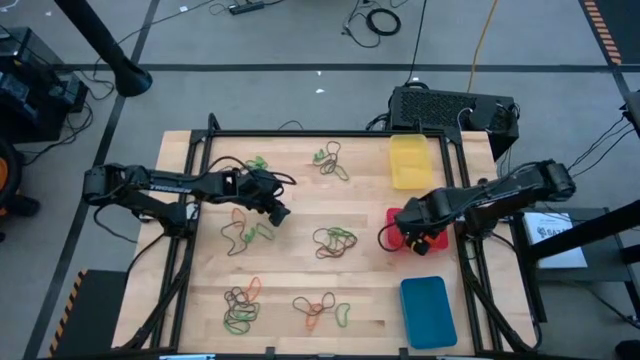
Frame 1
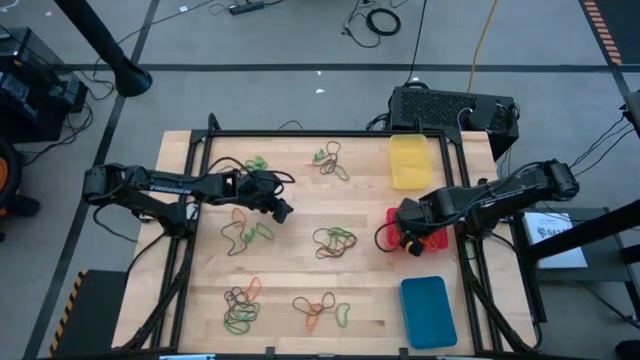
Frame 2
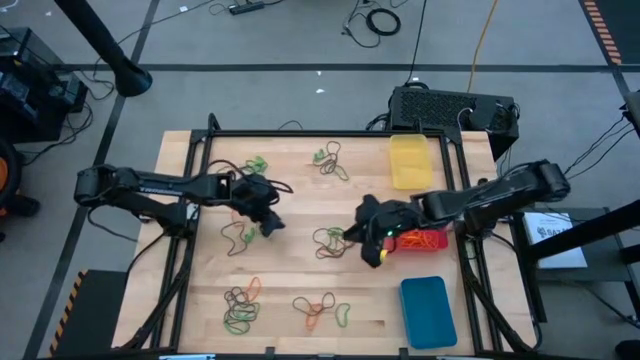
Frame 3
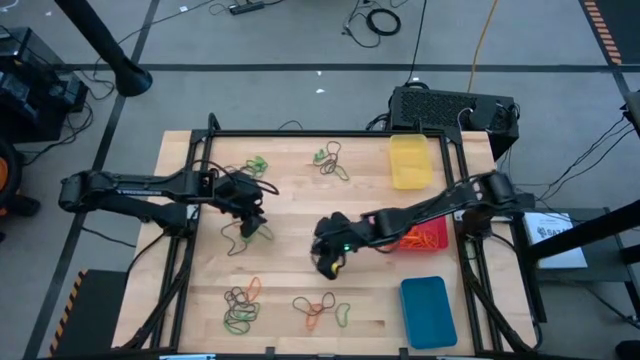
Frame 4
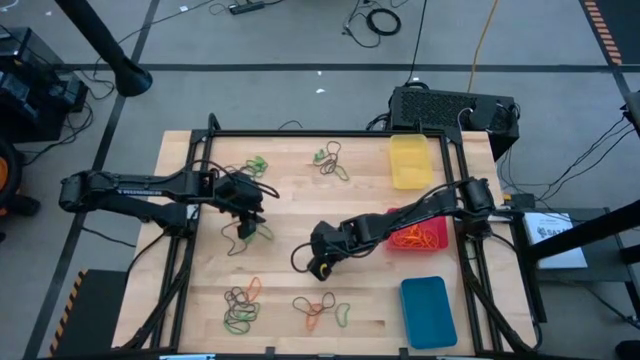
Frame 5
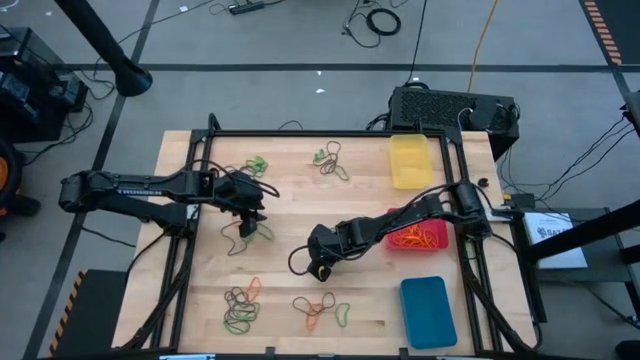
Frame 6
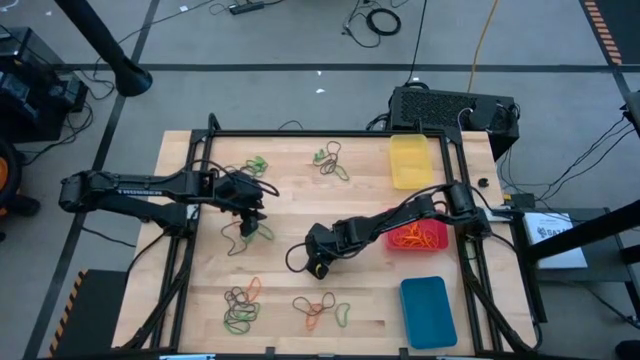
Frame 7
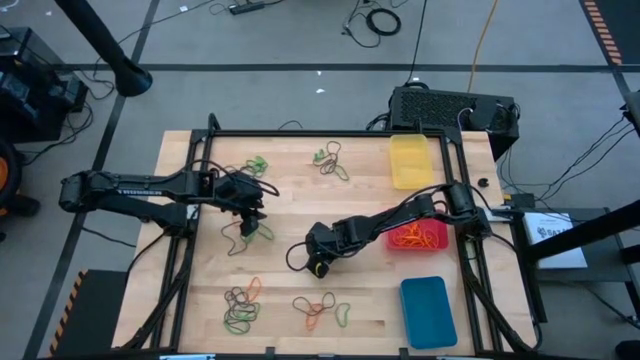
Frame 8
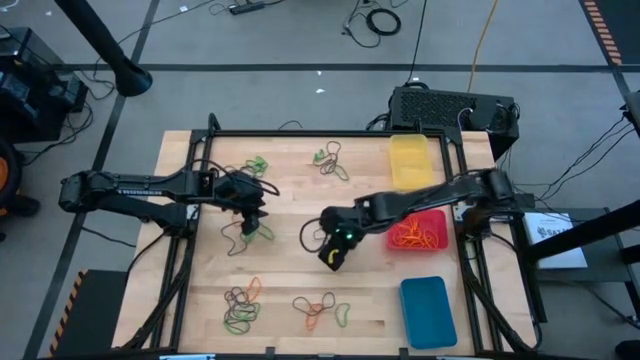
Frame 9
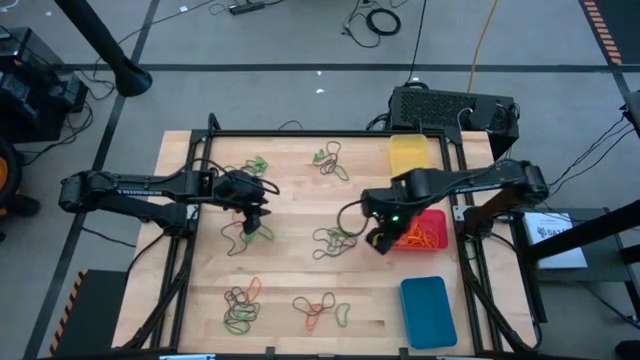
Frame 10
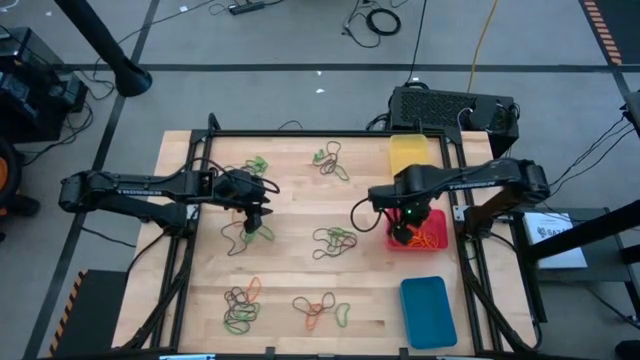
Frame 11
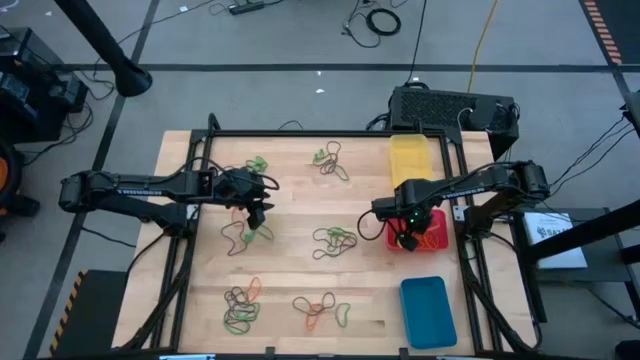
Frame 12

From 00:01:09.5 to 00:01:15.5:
Task: Sort rubber bands into baskets
Put the orange rubber band into the red bin

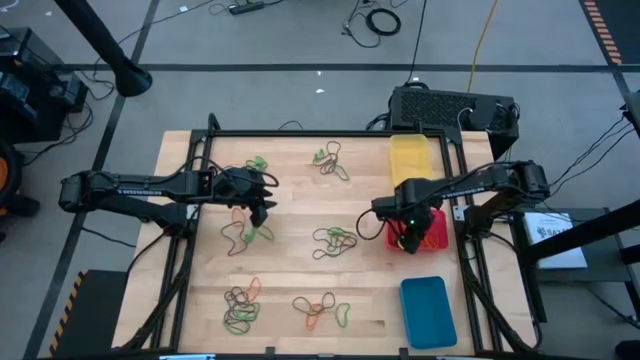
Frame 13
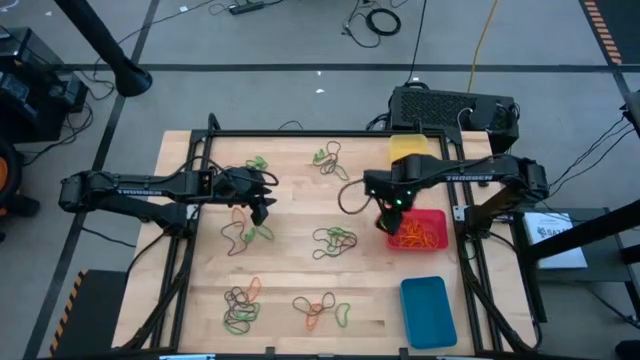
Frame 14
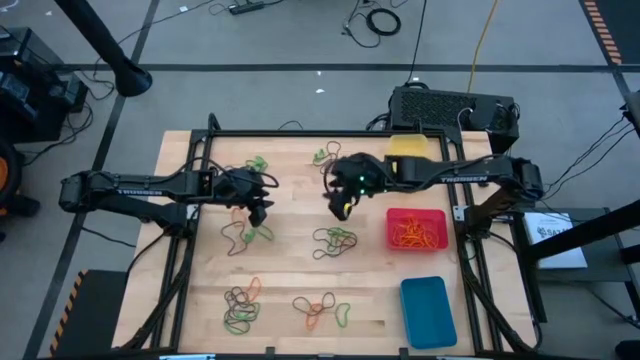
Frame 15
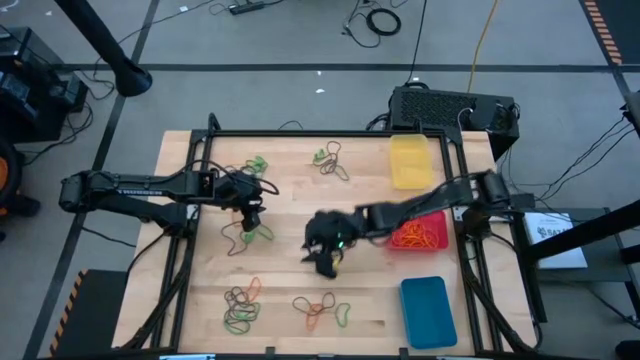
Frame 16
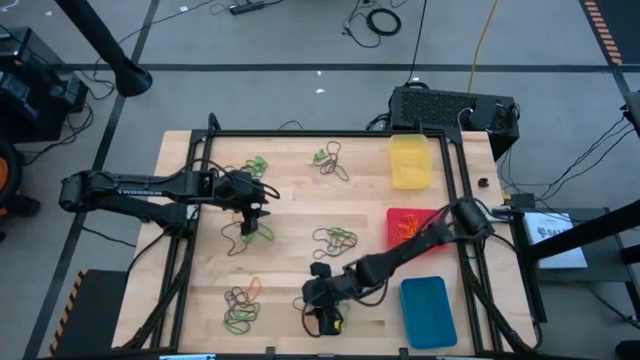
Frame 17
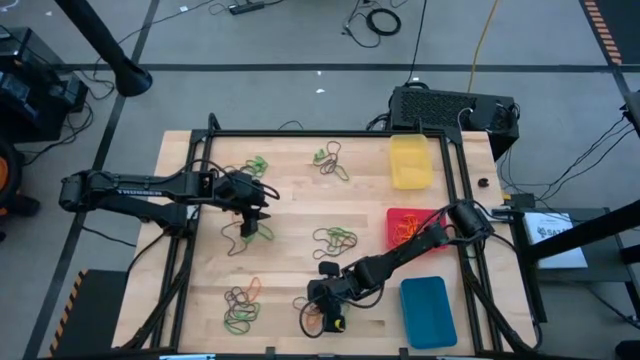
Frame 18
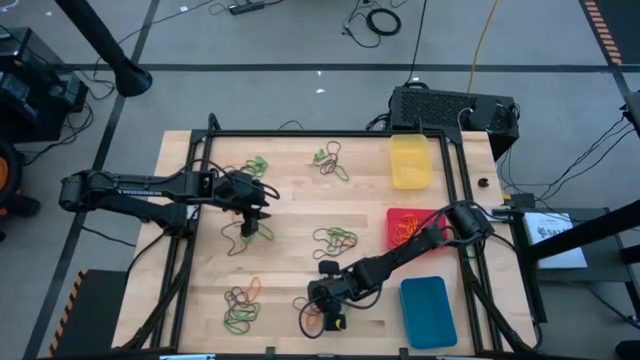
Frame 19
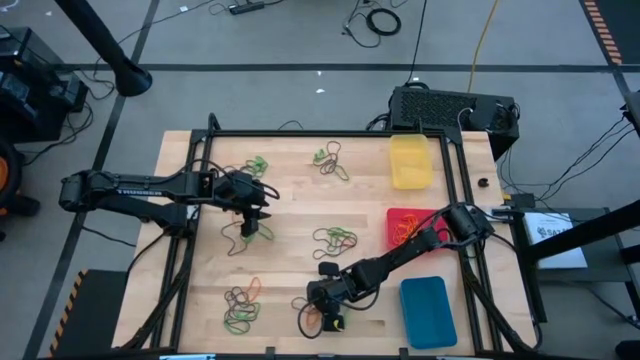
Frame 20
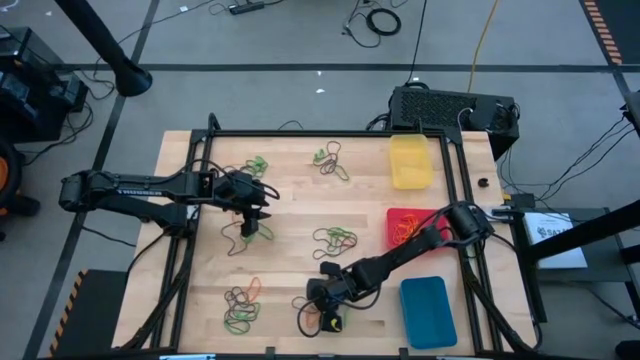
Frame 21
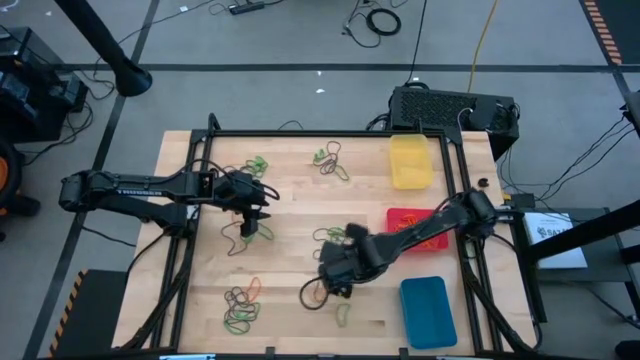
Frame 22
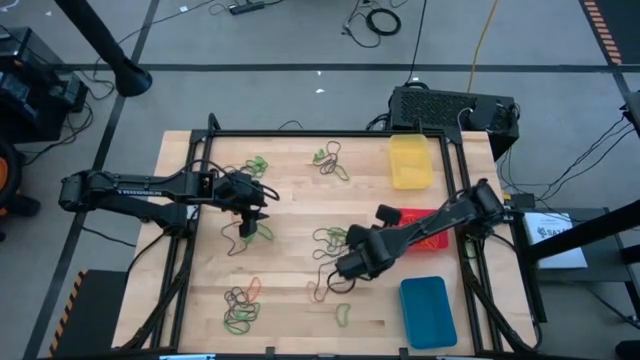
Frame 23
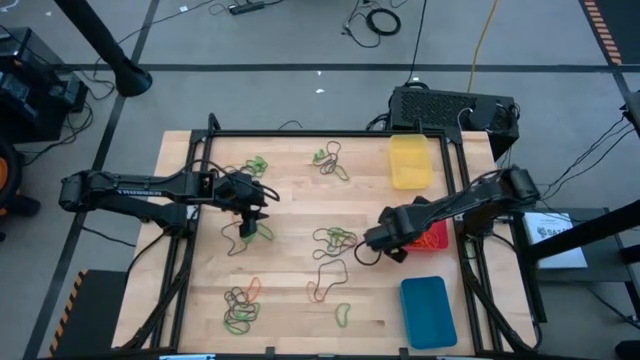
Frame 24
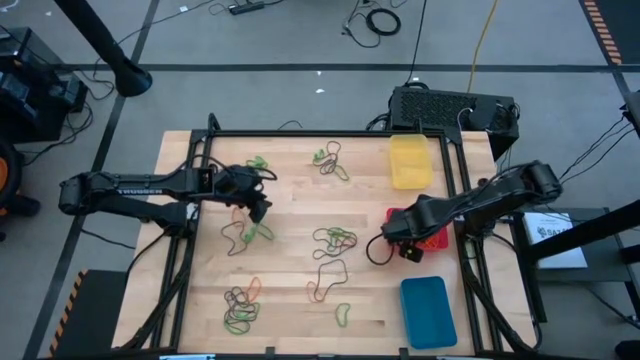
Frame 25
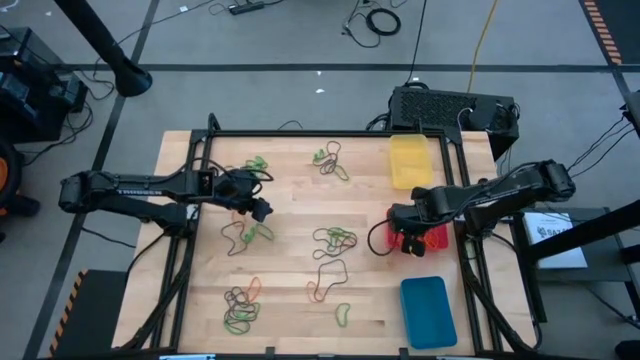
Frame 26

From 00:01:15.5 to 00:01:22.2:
Put the orange rubber band into the red bin

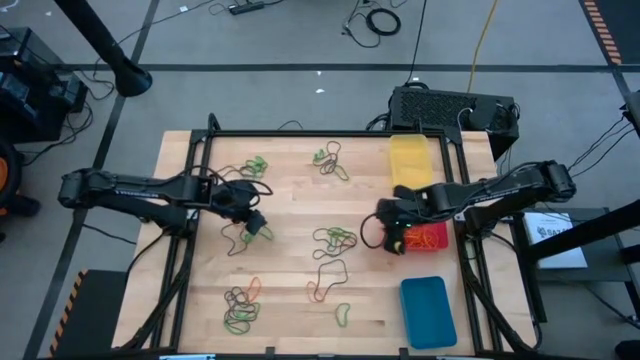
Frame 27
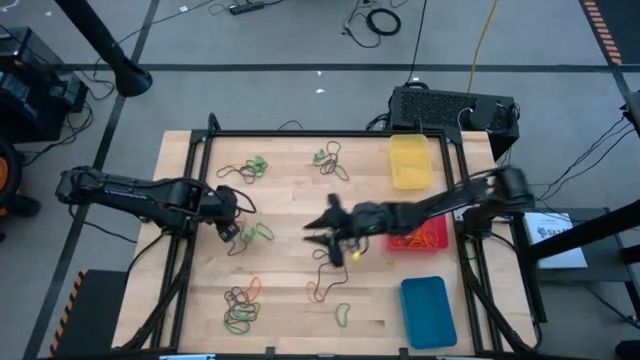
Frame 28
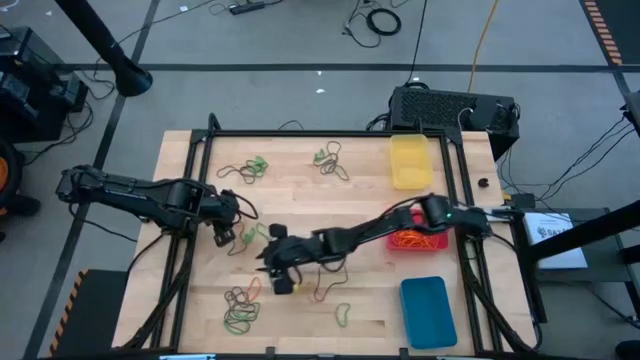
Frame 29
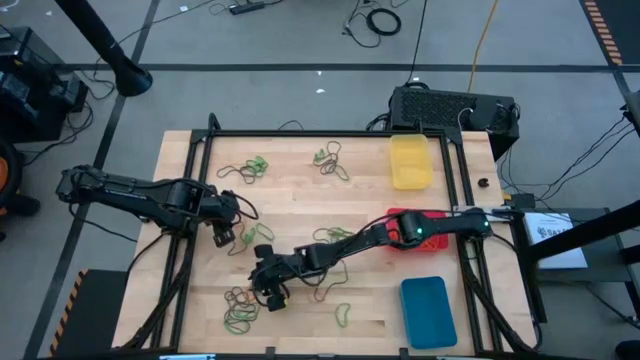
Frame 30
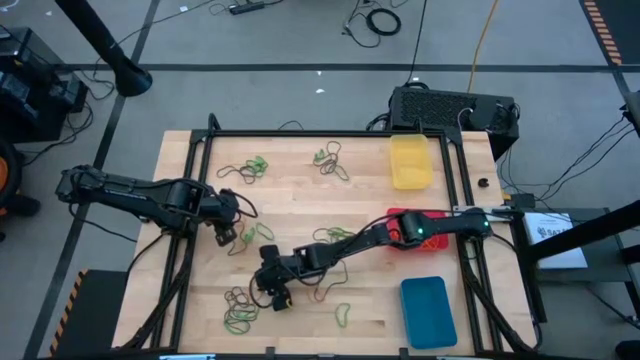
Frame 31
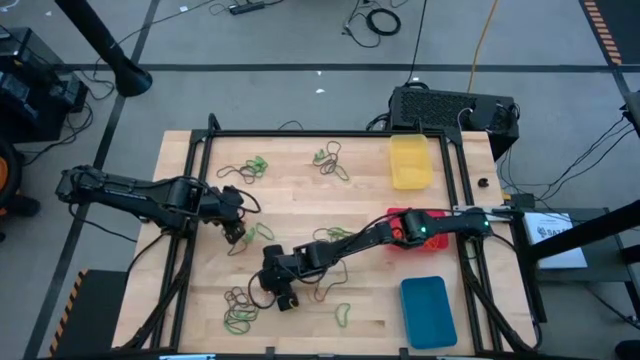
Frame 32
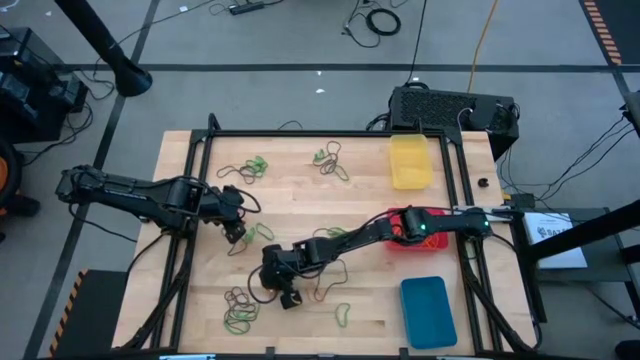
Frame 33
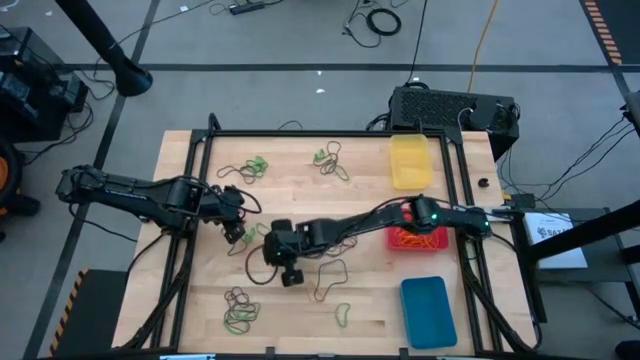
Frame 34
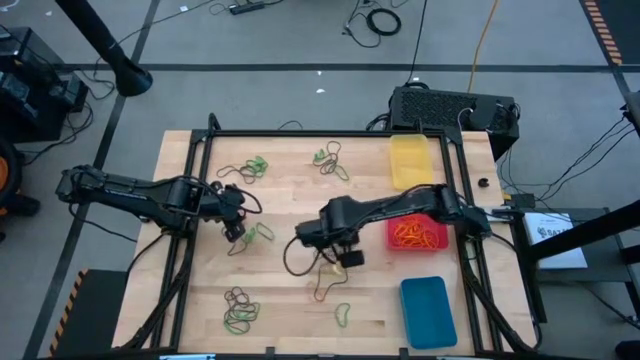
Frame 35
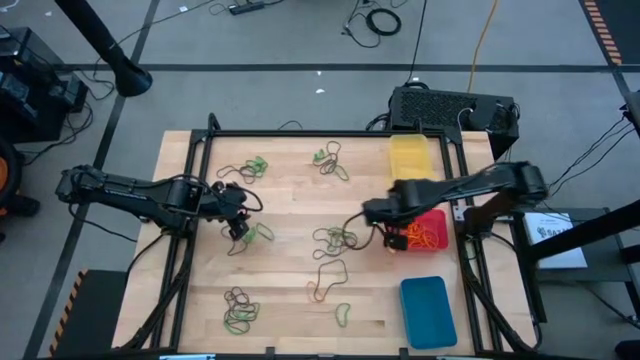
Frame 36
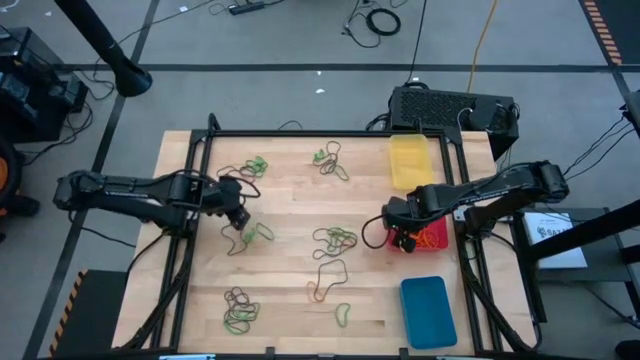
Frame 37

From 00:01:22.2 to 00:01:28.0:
Put the orange rubber band into the red bin

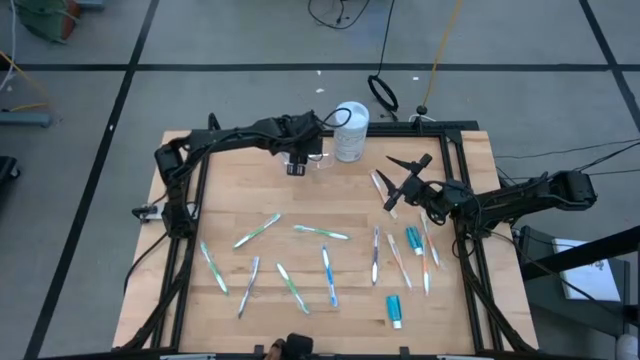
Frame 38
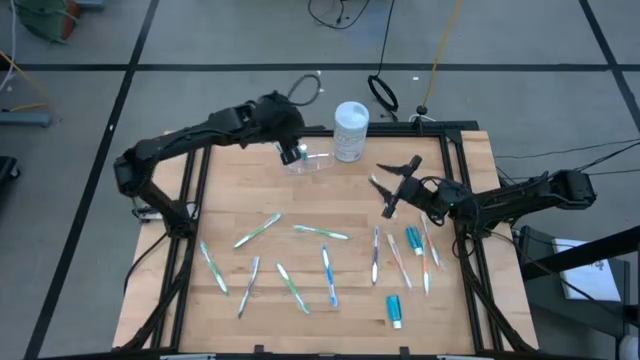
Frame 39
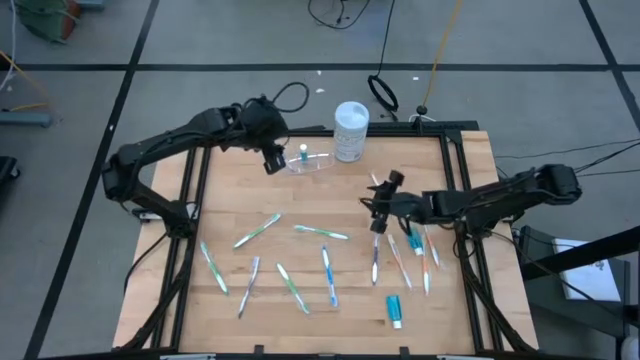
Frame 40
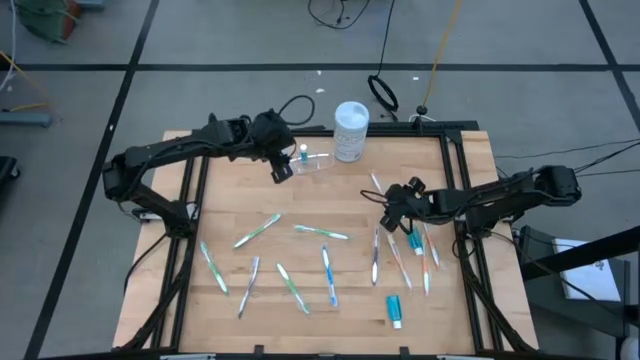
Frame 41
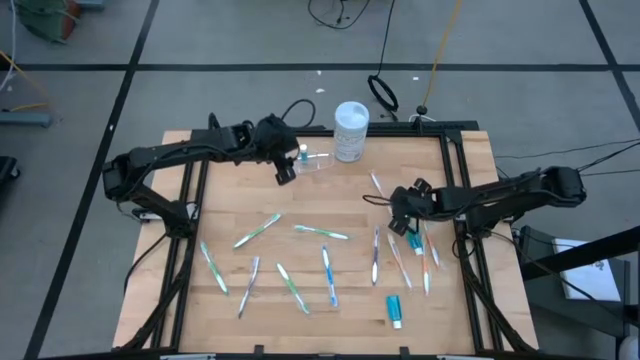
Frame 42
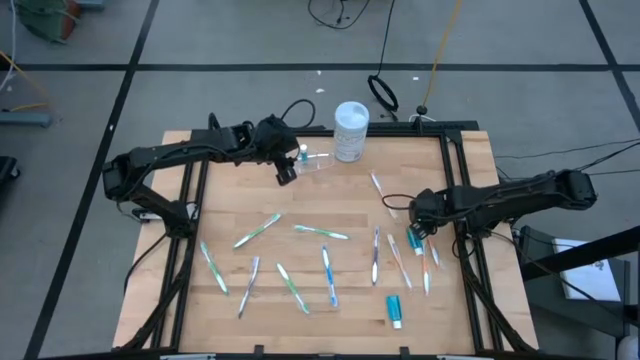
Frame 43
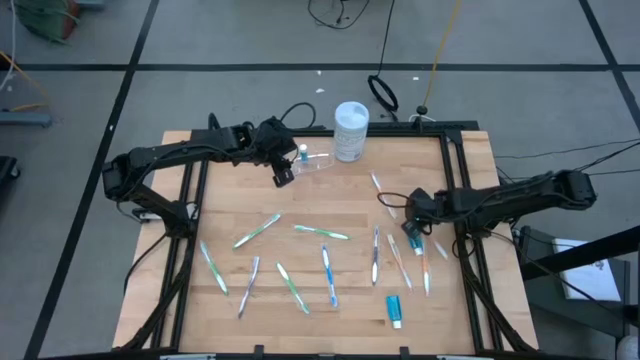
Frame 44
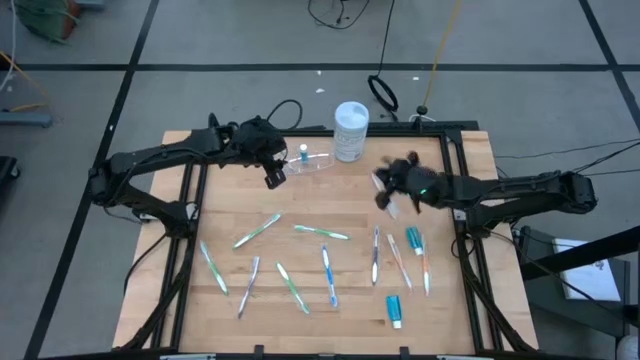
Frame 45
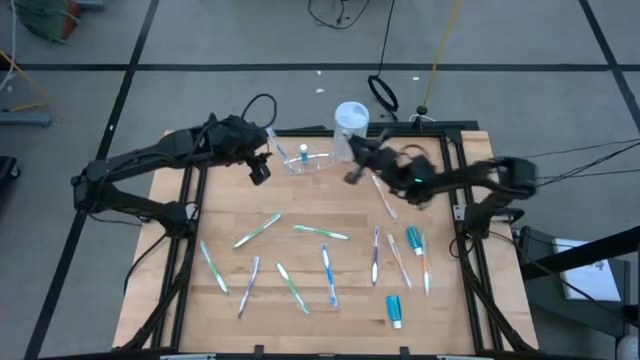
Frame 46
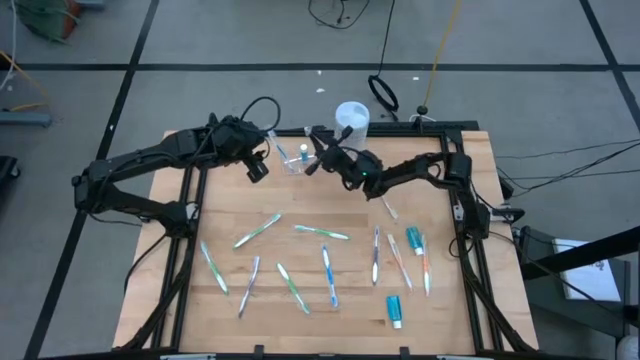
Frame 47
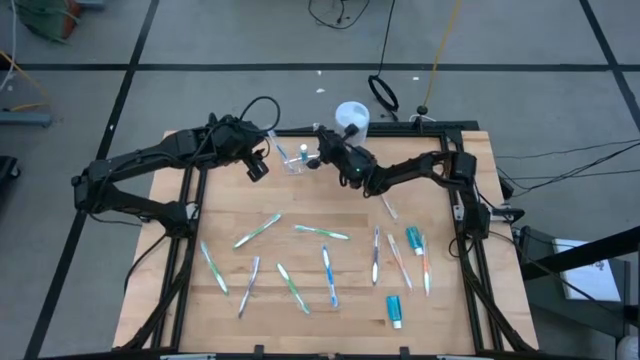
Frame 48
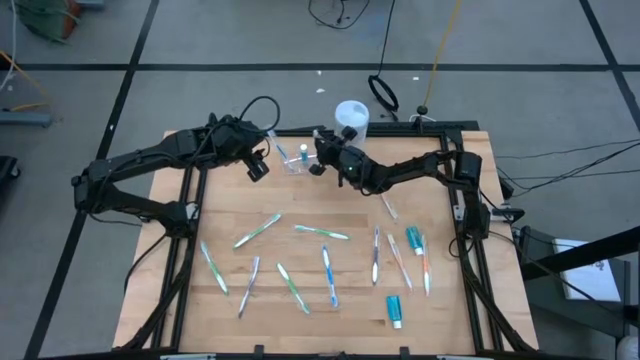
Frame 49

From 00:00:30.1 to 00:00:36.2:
Task: Pick & Place toothbrushing station
Put the orange toothbrush into the transparent organizer
